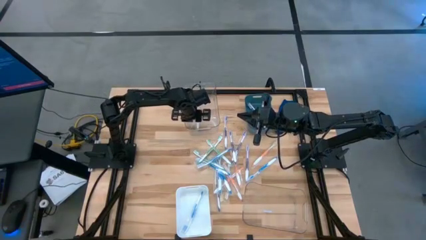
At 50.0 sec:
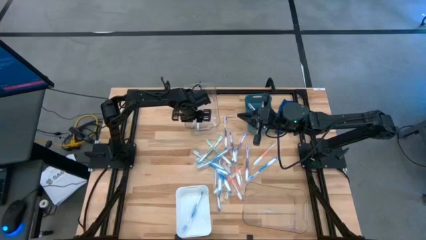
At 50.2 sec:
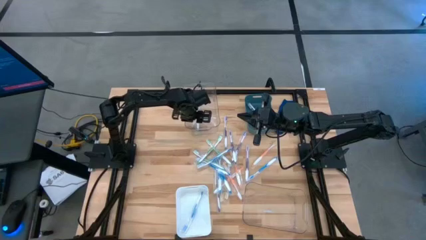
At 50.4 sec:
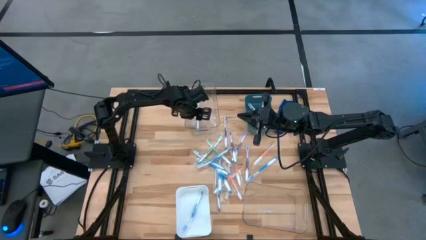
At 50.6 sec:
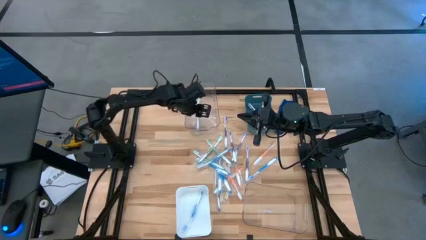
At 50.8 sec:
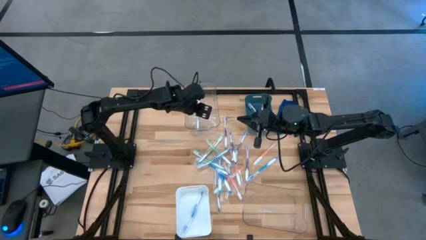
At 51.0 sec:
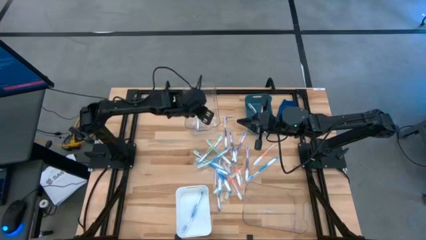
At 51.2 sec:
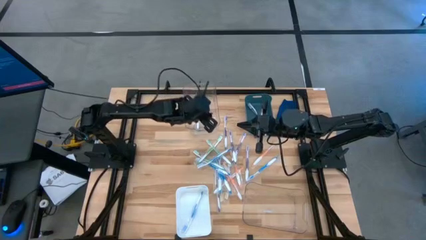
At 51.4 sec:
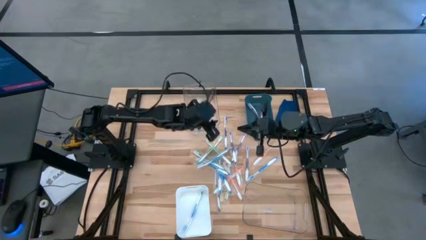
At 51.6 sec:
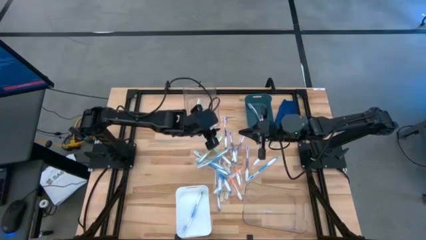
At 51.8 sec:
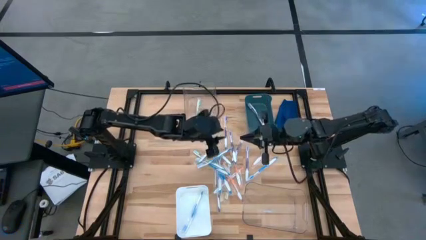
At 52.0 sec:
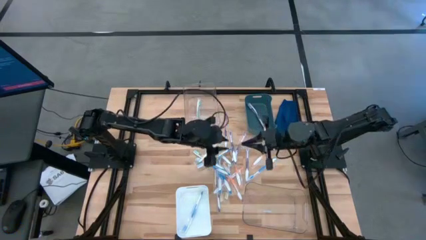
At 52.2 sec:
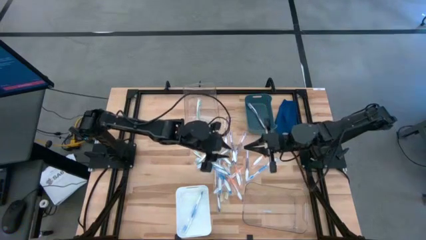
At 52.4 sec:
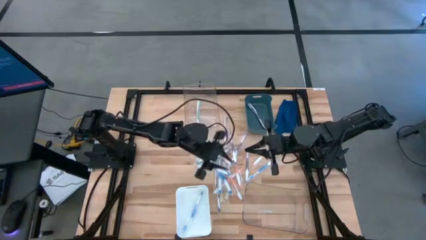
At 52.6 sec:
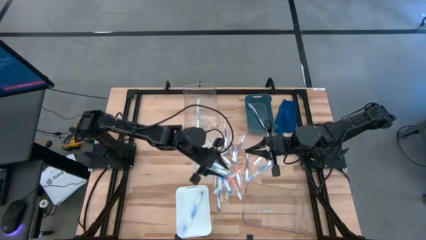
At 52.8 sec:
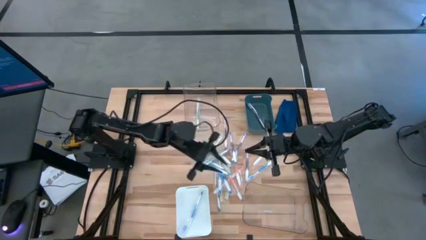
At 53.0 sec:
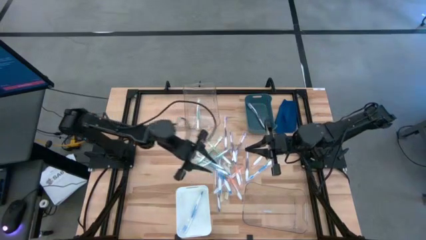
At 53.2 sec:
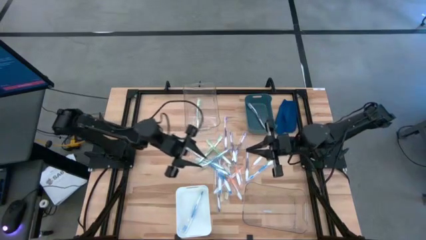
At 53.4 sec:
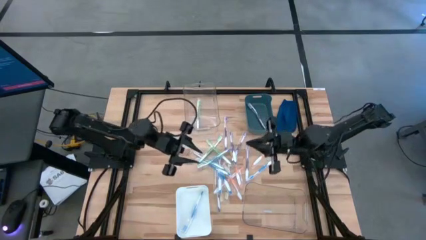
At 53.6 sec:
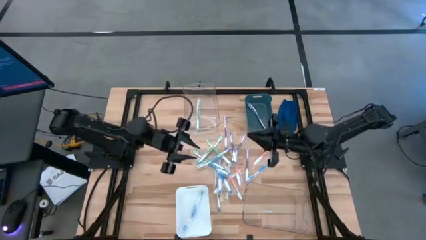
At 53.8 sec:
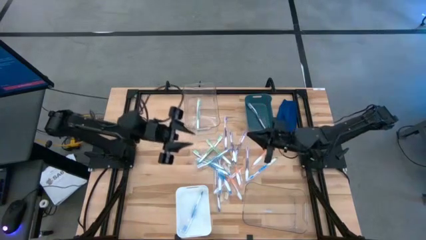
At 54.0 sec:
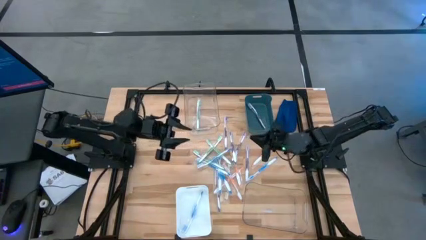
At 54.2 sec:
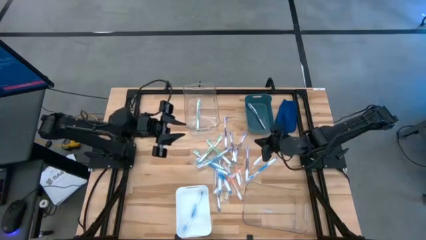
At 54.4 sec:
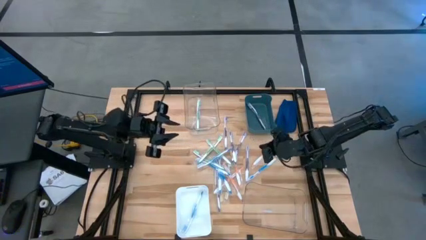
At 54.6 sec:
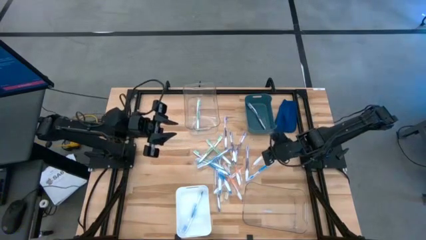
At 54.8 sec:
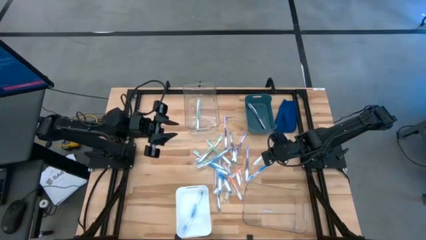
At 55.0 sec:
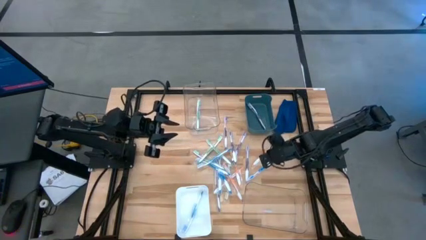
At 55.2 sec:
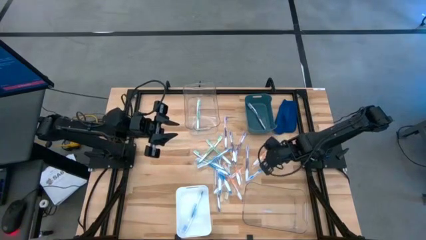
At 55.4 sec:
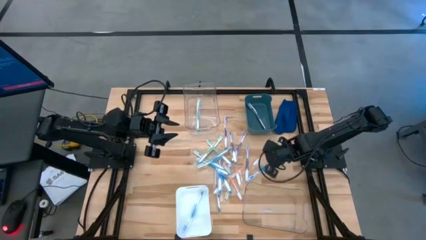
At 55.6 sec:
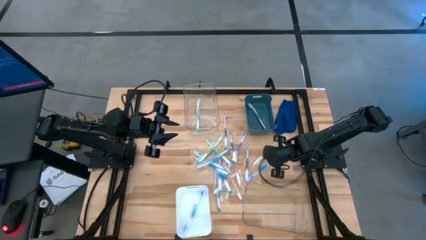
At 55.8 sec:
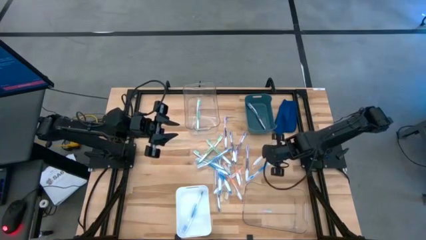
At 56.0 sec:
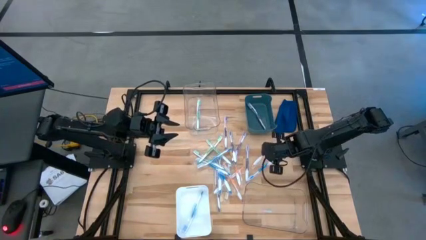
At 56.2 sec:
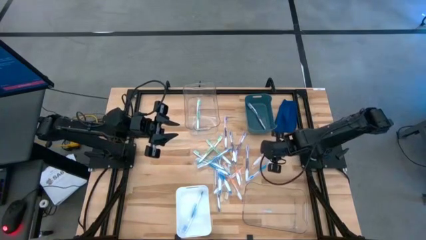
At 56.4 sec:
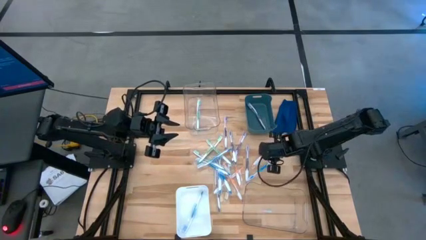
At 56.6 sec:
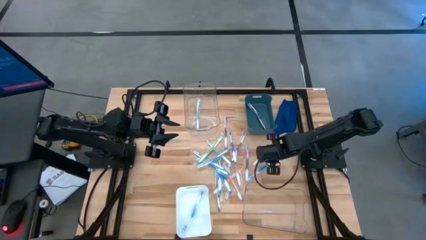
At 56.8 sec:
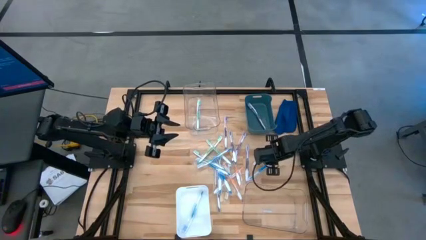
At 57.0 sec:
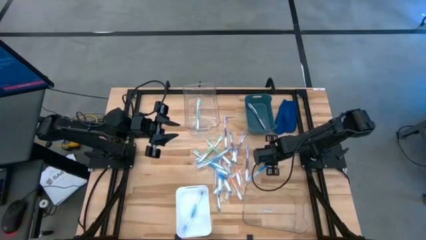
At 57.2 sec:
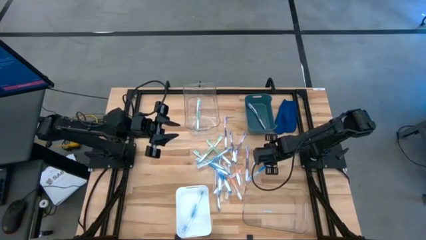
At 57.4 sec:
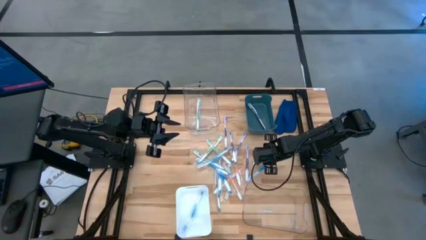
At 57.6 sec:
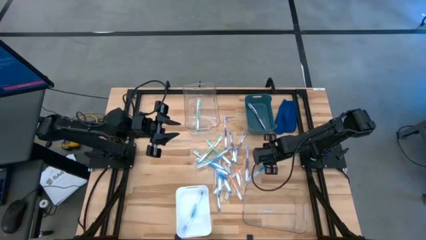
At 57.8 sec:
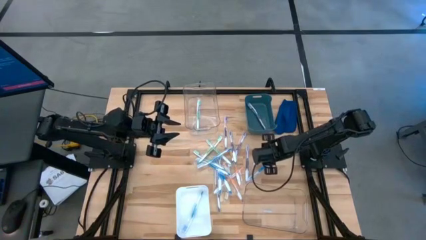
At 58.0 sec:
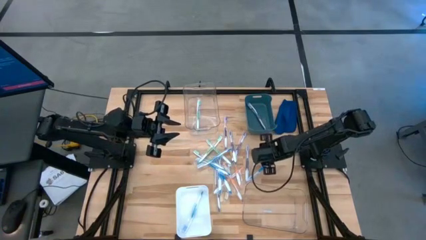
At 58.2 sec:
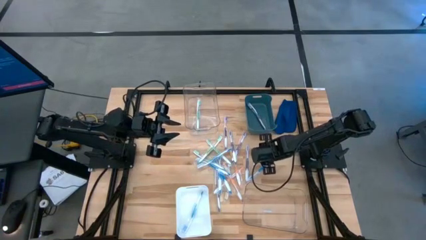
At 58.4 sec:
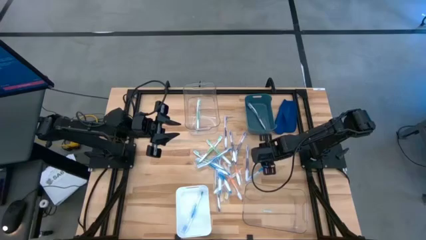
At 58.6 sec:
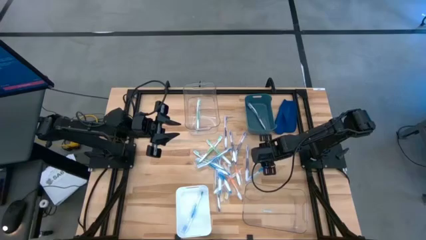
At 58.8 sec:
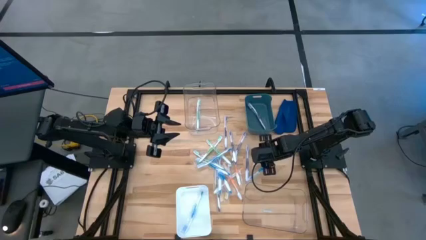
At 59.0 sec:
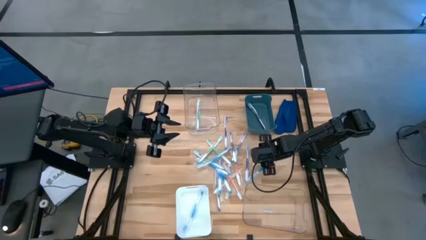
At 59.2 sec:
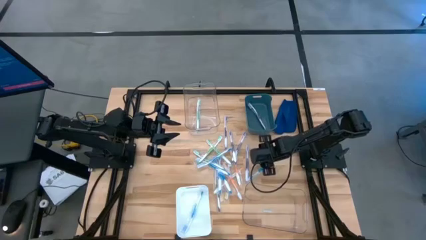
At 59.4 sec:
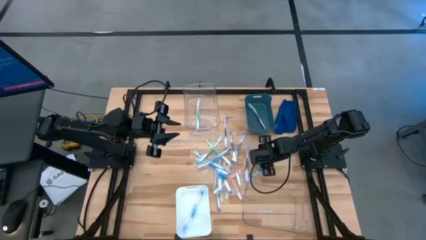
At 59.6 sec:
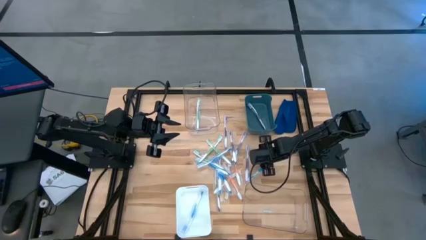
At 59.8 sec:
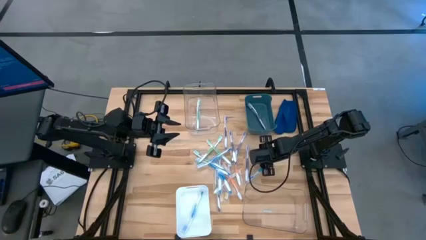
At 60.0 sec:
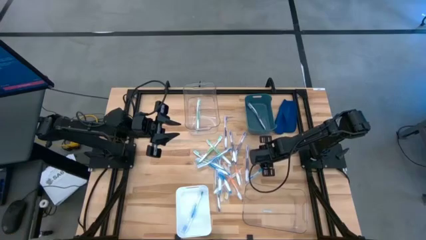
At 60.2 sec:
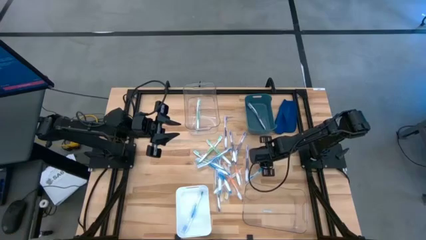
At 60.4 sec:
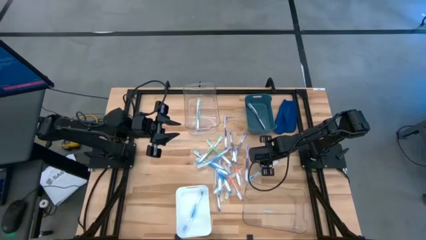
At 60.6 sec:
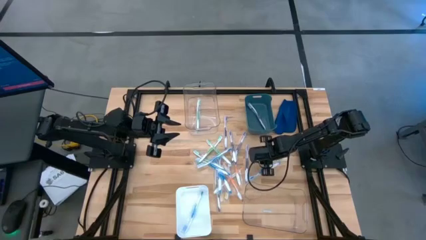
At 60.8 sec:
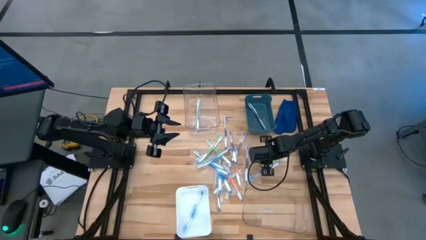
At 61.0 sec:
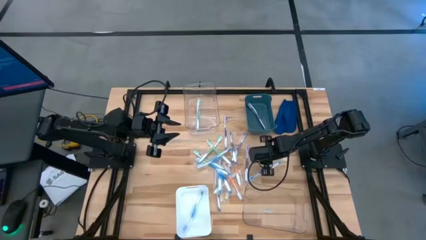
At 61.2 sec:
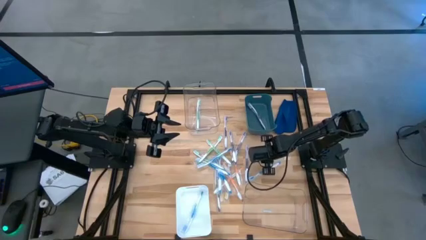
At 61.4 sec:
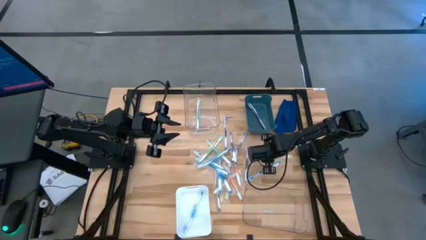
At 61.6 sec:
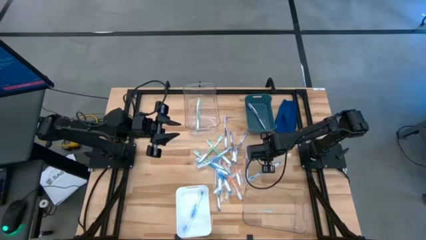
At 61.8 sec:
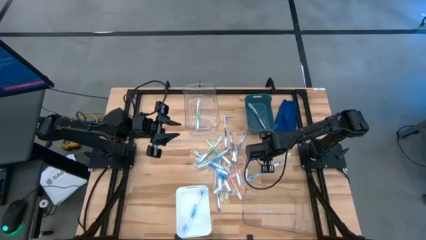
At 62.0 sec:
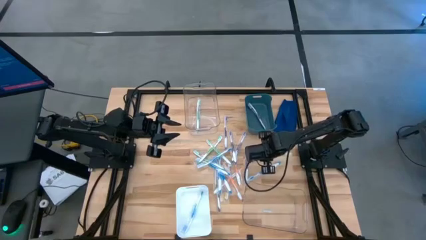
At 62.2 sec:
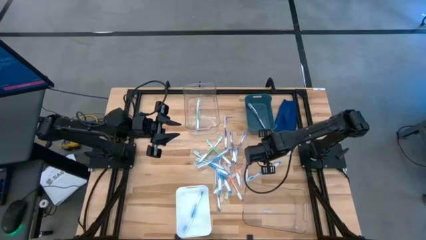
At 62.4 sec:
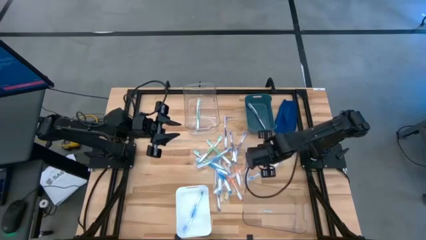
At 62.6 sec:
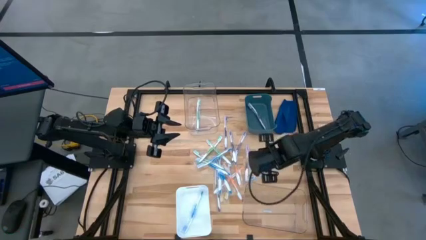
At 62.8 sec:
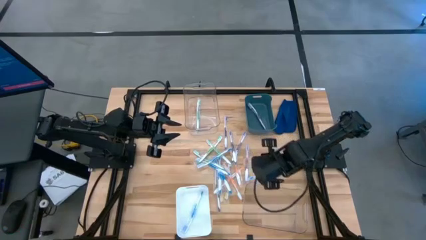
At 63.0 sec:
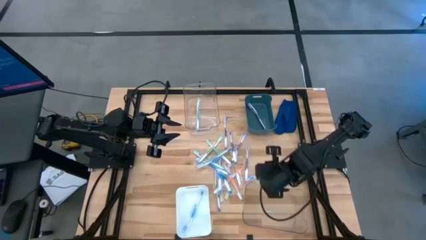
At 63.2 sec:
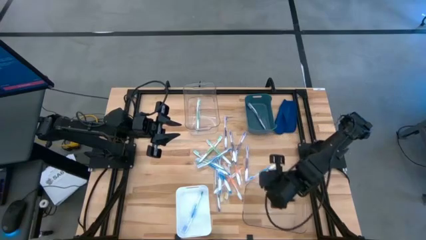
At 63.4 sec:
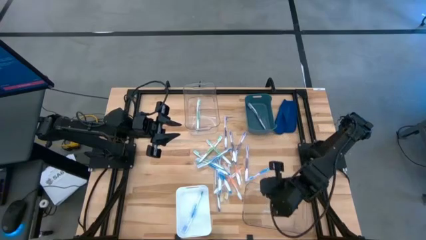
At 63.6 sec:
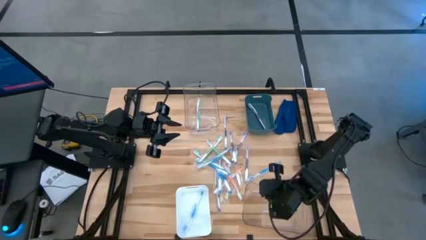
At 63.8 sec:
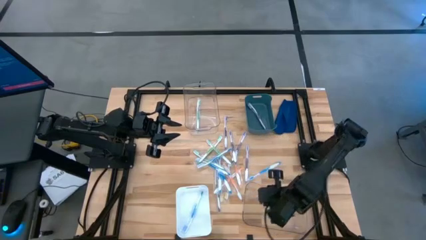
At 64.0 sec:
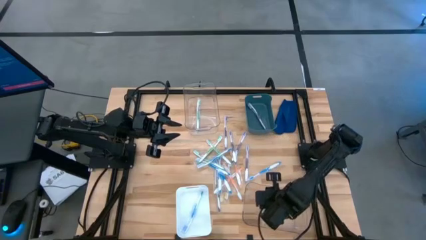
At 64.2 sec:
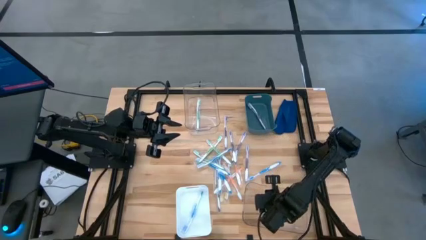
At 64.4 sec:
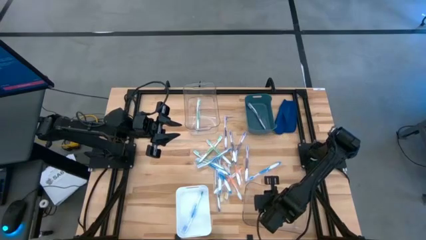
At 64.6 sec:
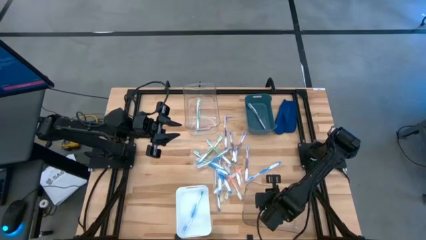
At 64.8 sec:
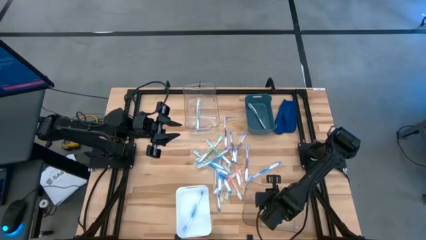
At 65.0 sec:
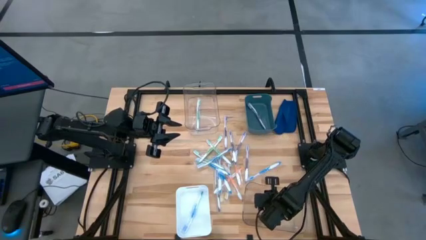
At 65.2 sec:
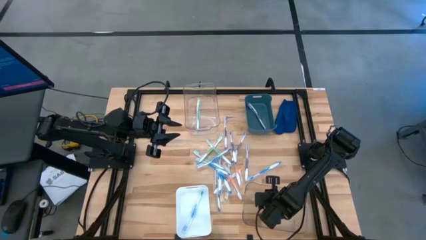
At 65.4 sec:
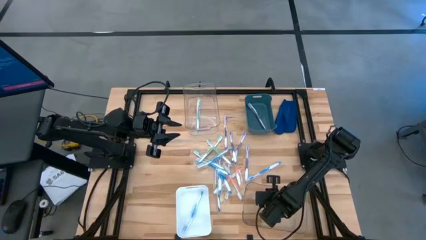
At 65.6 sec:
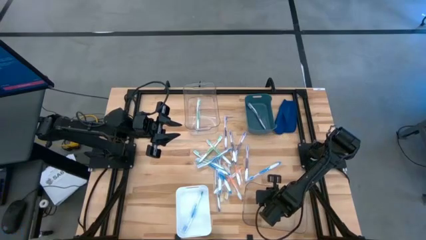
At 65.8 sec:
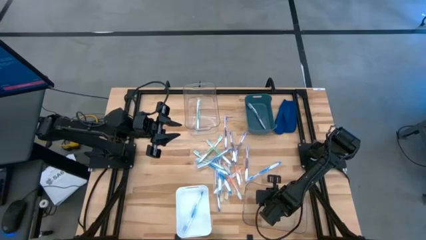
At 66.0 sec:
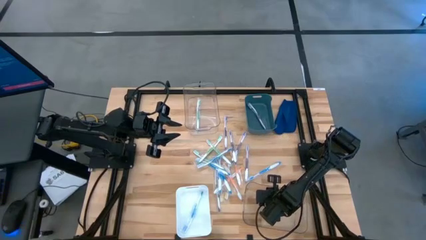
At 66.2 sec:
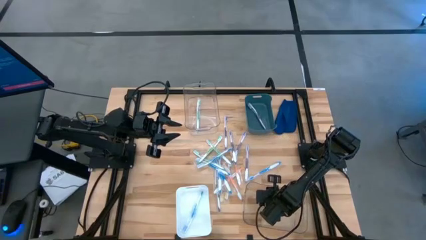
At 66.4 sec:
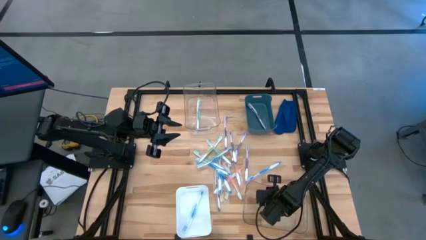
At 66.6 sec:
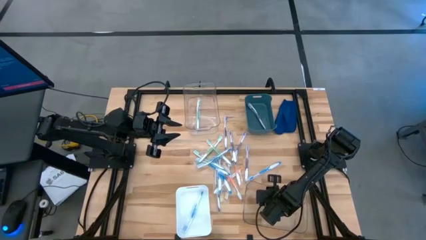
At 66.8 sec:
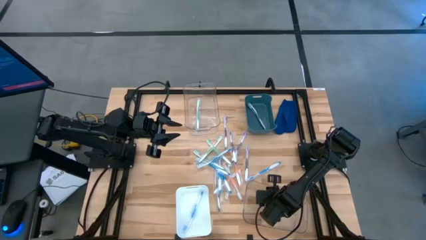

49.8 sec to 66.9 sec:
Task: Pick & Place Toothbrushes
Put the orange toothbrush into the bottom transparent bin
